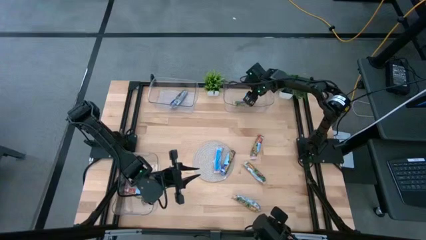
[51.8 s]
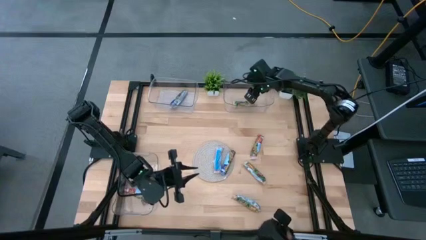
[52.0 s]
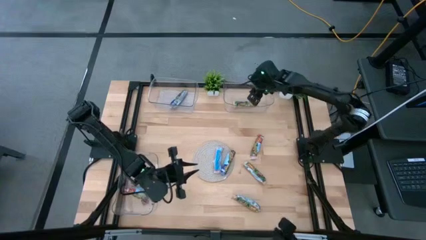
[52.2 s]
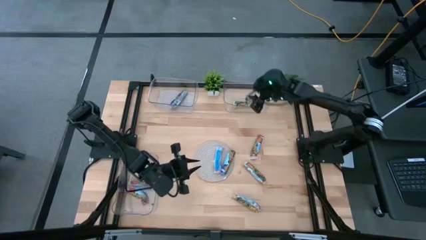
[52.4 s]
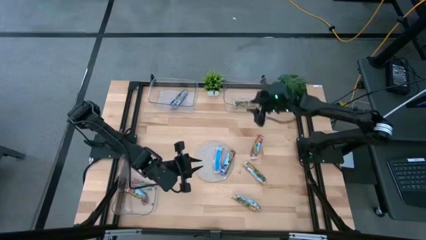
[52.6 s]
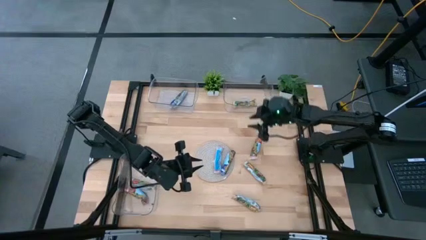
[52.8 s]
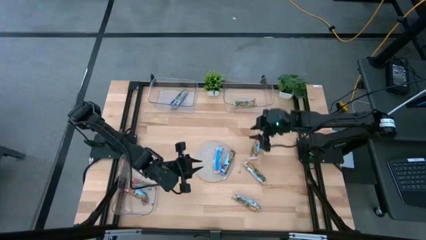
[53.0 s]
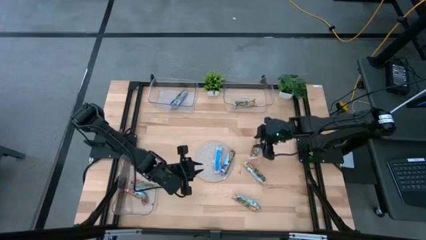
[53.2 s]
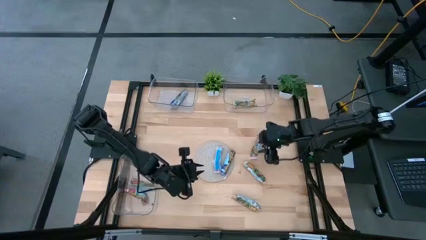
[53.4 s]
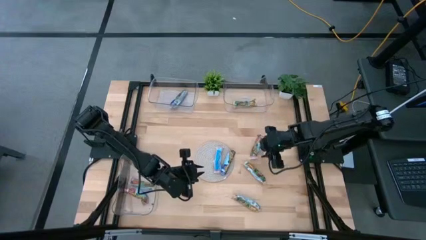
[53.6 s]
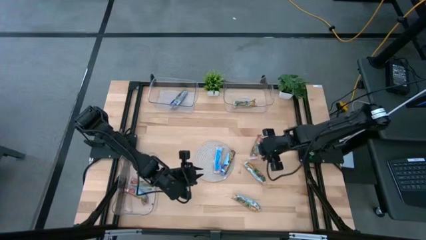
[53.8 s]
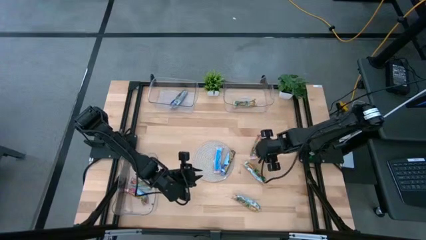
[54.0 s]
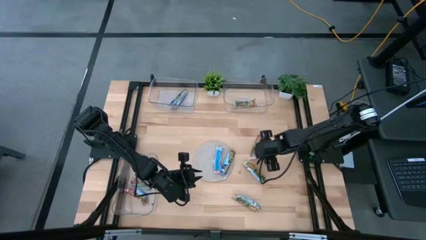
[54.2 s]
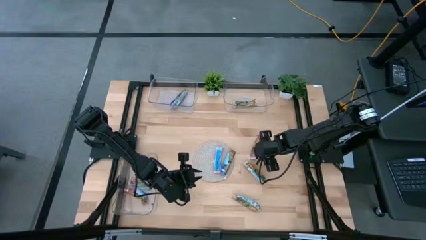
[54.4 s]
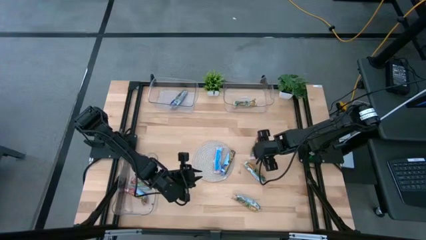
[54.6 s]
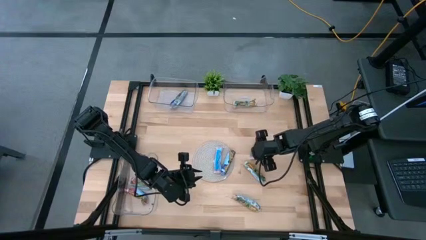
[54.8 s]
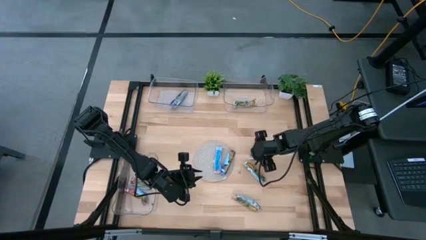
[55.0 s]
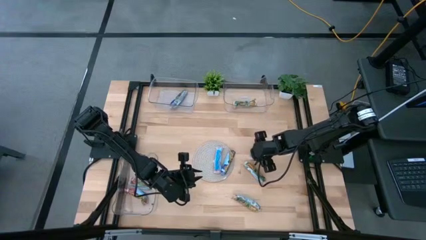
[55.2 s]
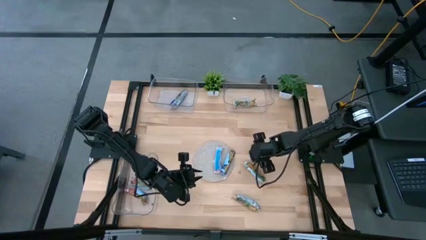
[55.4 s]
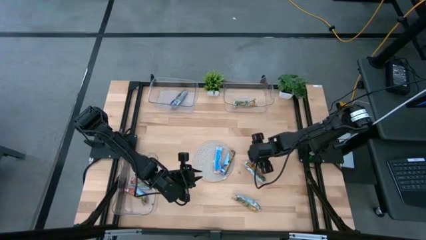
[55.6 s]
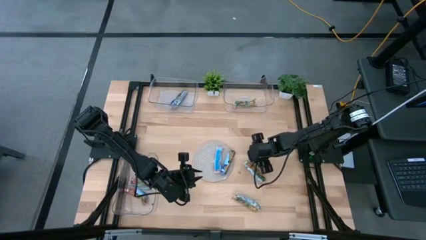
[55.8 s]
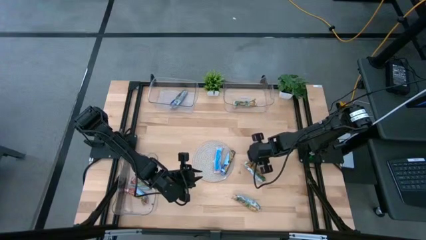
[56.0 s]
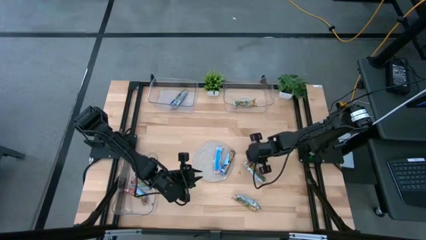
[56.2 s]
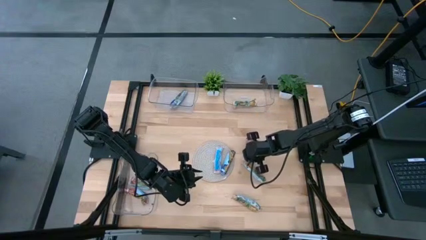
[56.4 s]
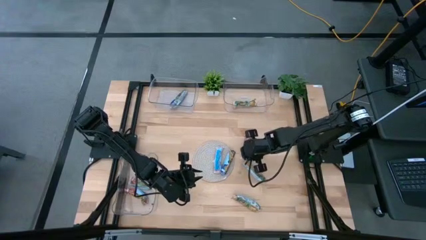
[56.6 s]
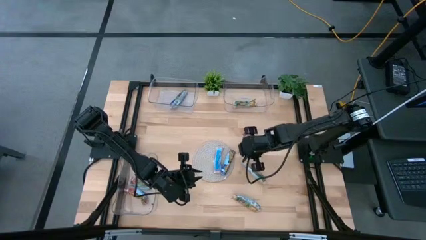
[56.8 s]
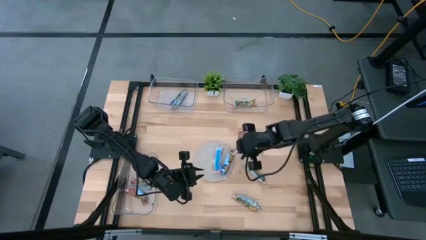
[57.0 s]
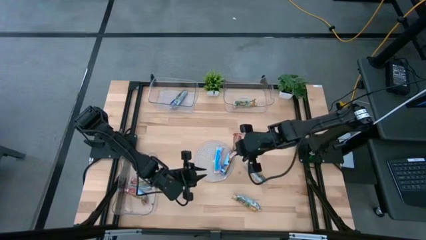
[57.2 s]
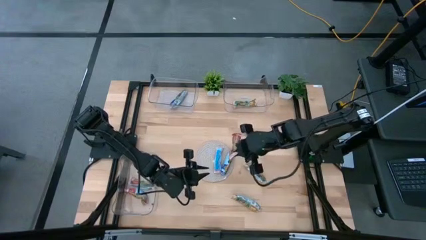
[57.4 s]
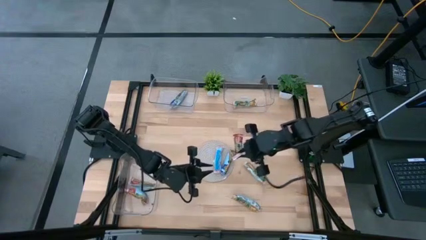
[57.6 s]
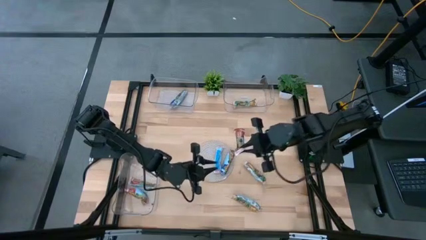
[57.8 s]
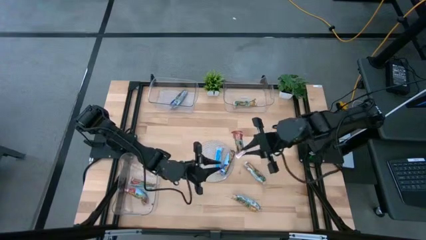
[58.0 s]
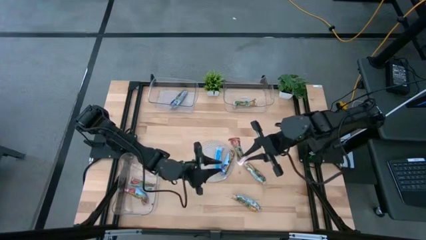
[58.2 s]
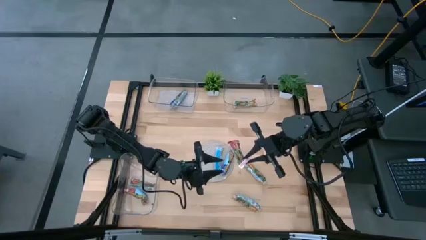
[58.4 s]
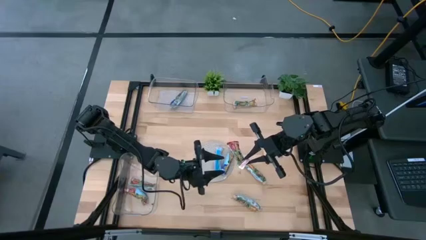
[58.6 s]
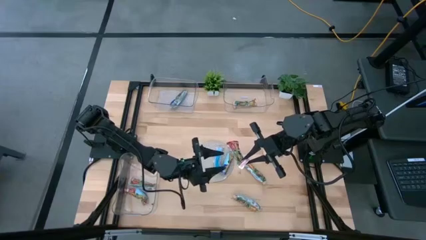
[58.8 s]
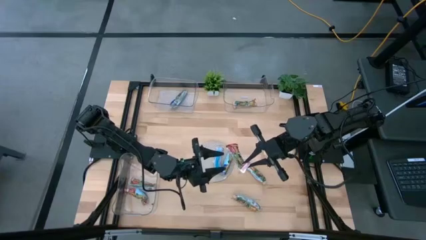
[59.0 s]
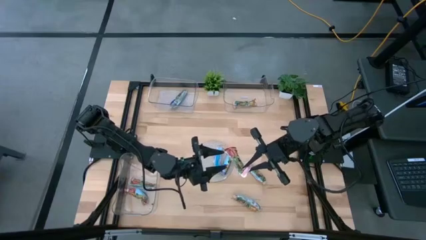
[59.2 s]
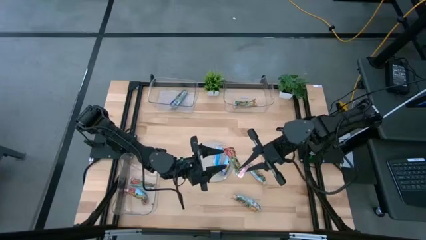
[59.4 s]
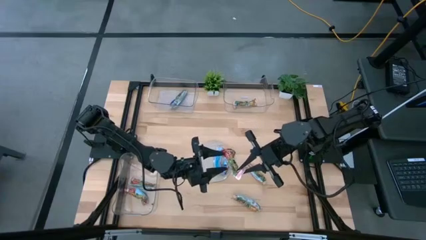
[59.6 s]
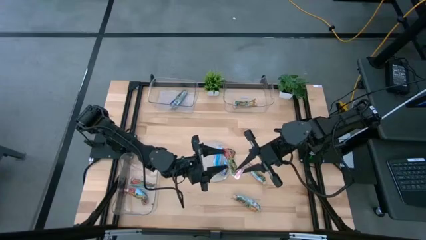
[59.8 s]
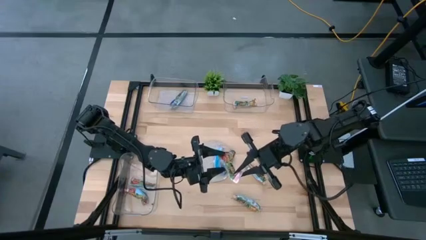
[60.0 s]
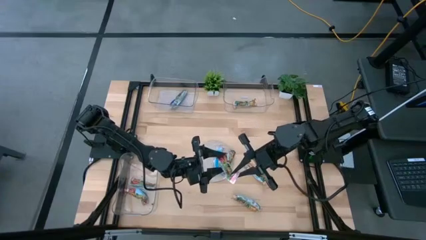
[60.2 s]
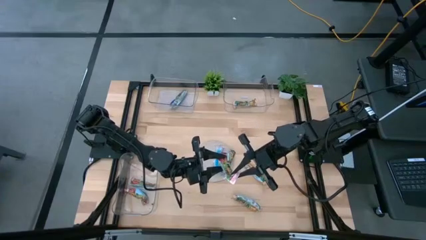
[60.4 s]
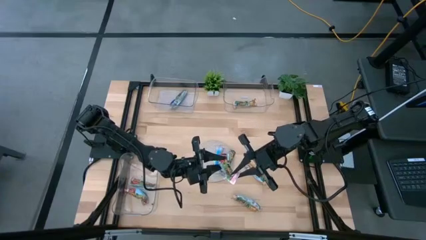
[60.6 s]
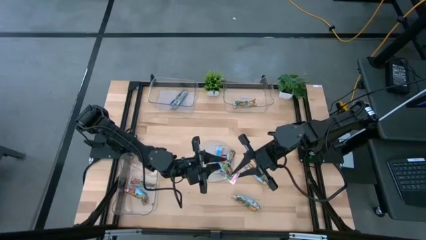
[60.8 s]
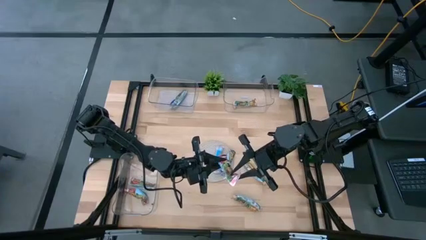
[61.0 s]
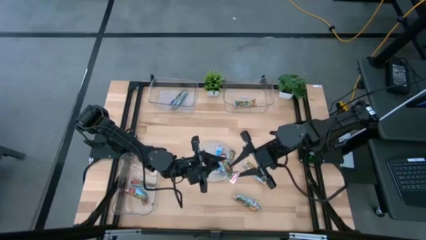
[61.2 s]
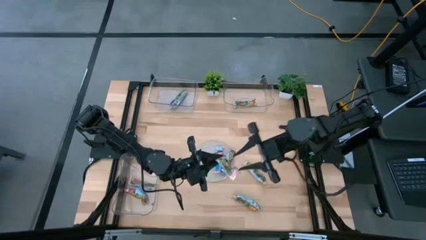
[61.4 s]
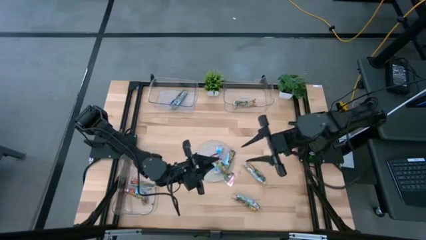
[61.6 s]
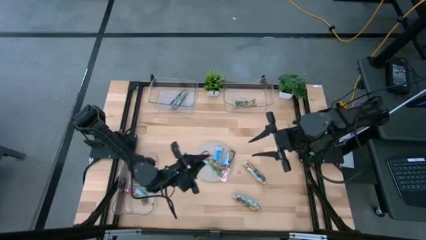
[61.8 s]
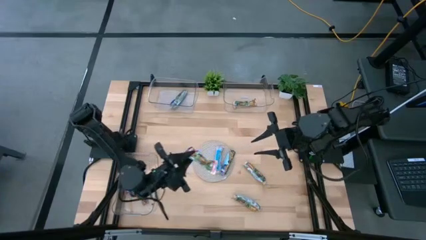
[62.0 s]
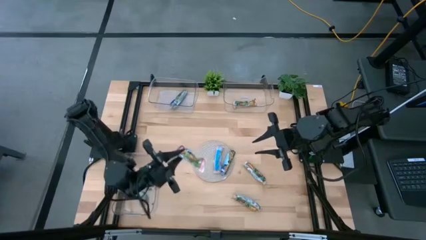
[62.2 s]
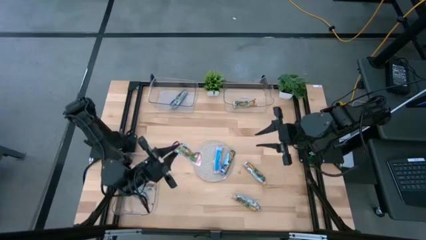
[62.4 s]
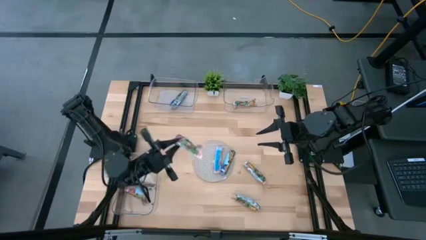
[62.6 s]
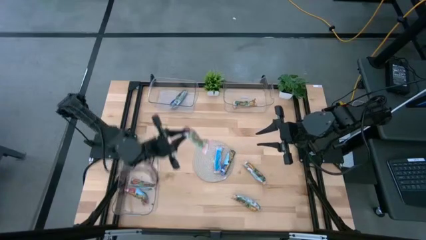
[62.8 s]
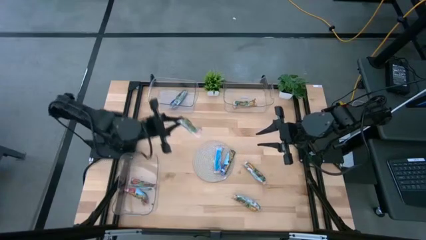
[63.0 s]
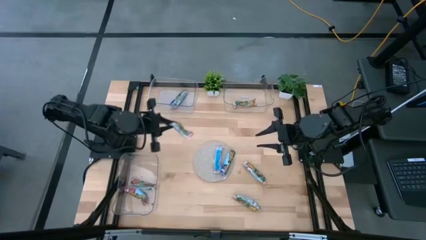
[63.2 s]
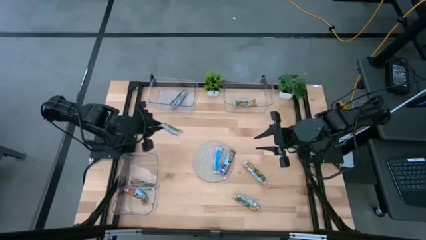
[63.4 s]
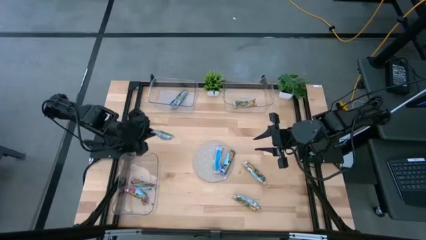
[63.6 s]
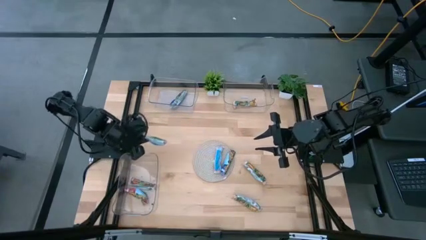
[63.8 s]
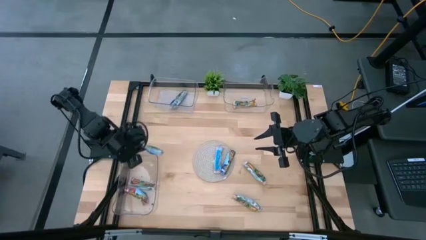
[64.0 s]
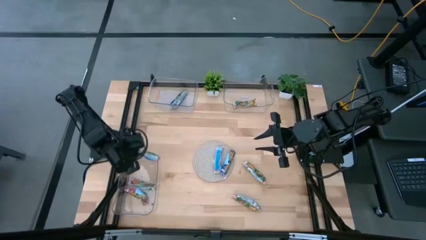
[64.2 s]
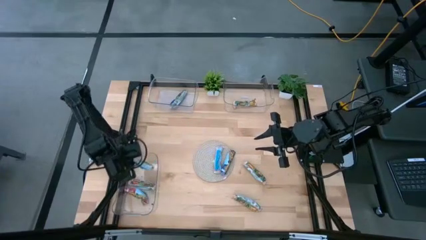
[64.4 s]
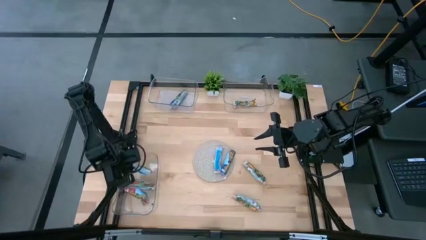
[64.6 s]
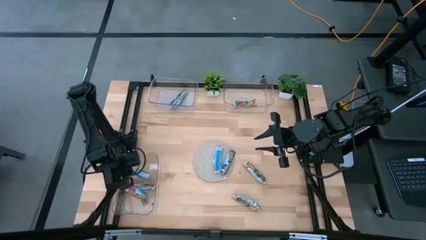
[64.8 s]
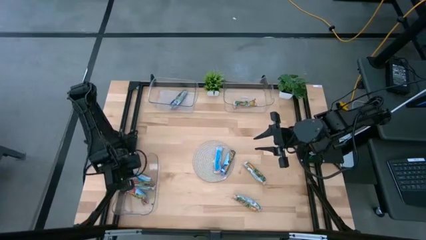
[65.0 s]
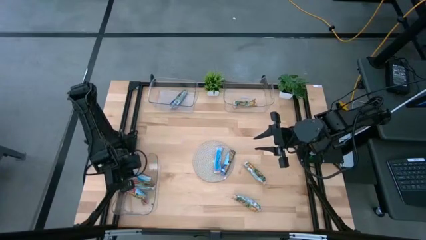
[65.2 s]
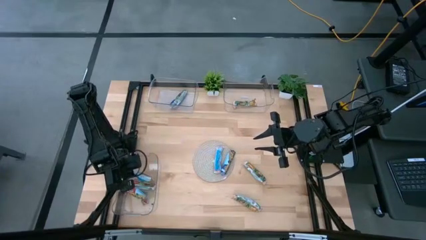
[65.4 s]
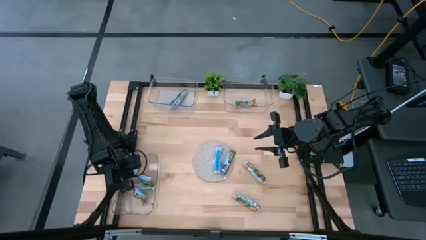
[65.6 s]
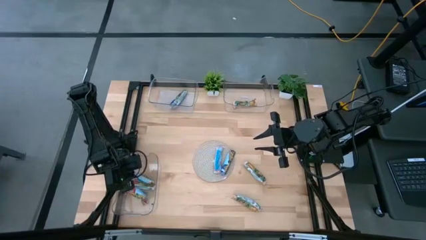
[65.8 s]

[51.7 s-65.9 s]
Task: Pick and place Granola Bars by type
Put the red granola bar into the bottom transparent bin
